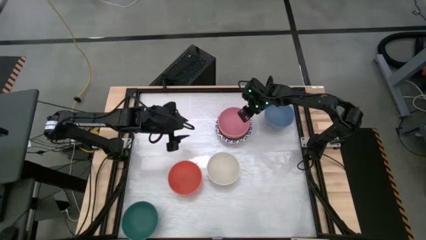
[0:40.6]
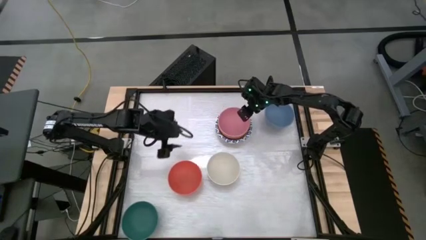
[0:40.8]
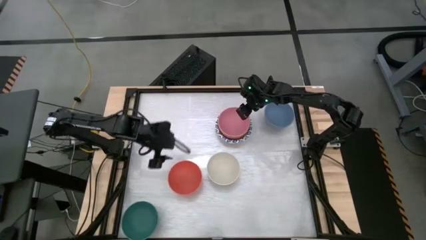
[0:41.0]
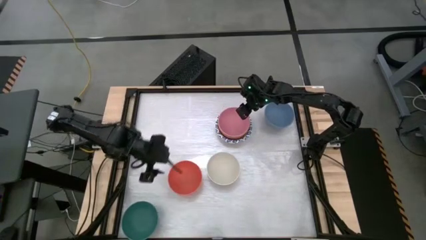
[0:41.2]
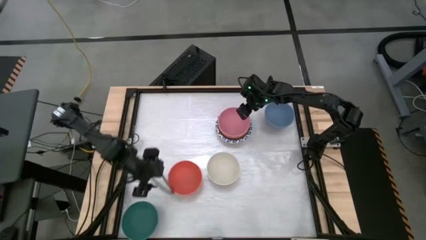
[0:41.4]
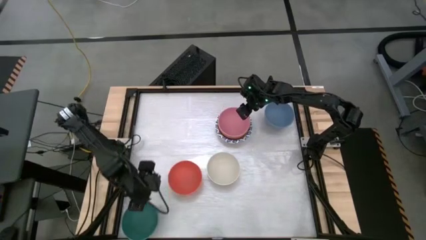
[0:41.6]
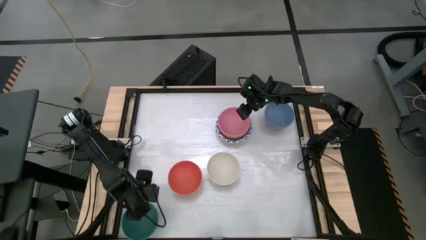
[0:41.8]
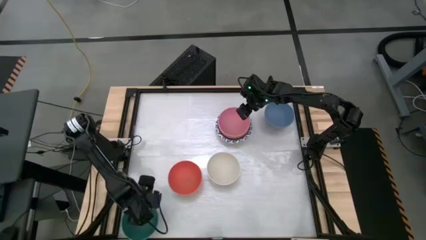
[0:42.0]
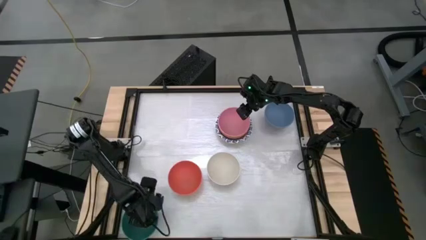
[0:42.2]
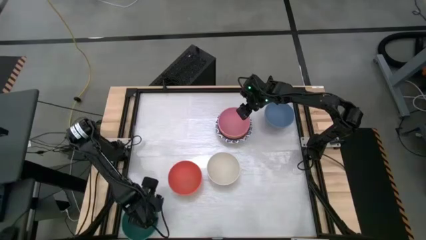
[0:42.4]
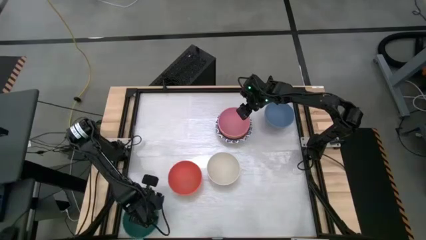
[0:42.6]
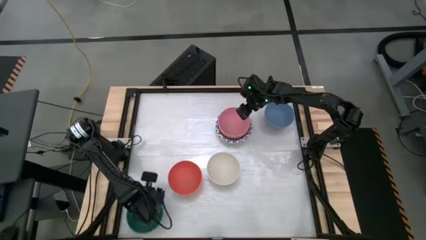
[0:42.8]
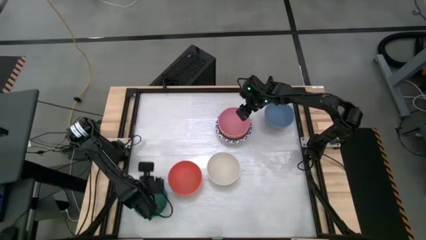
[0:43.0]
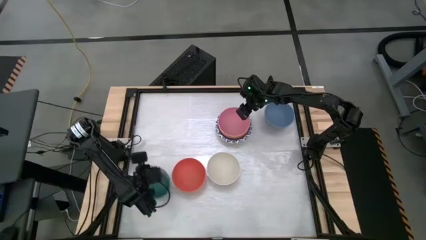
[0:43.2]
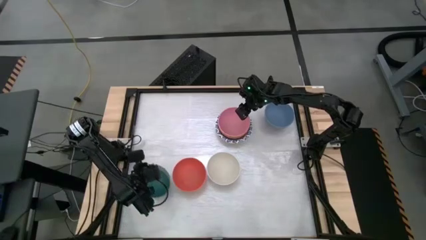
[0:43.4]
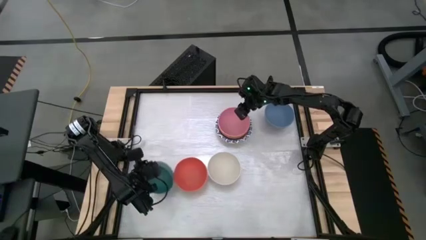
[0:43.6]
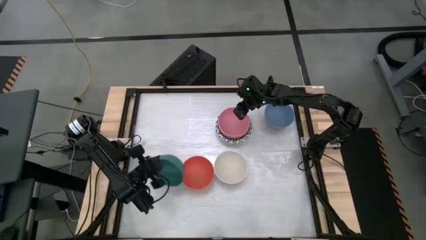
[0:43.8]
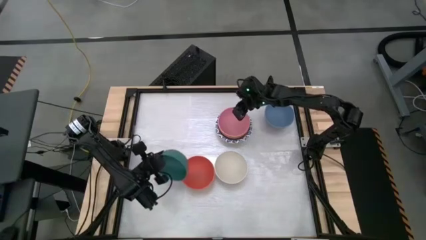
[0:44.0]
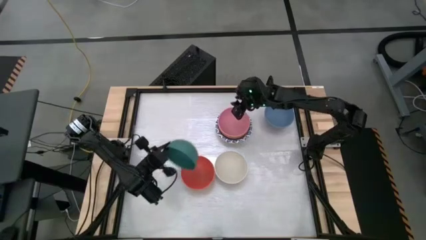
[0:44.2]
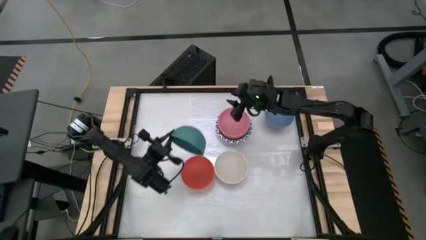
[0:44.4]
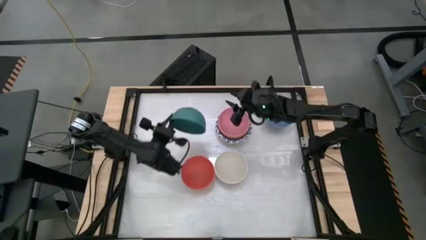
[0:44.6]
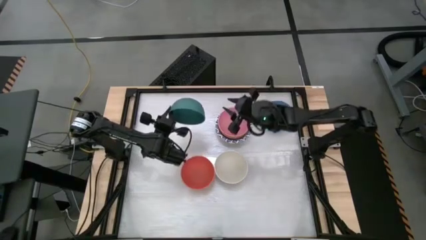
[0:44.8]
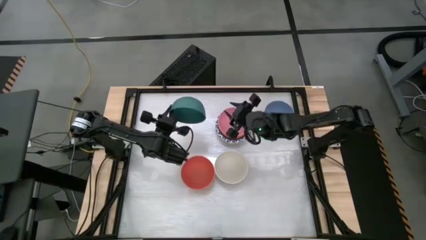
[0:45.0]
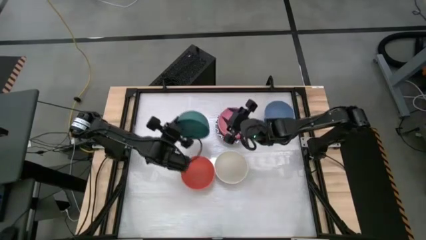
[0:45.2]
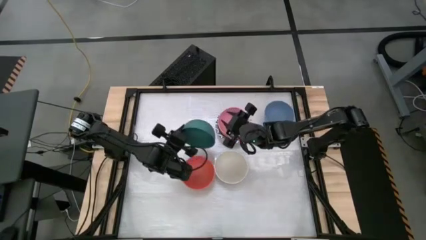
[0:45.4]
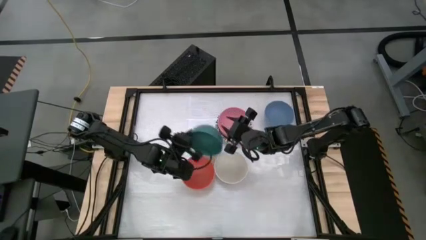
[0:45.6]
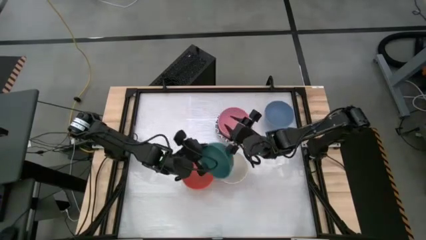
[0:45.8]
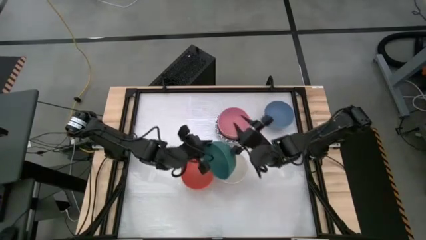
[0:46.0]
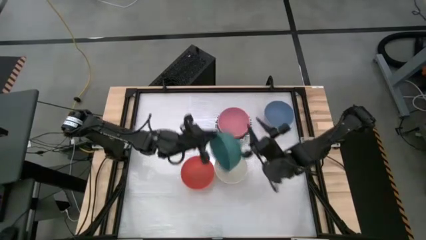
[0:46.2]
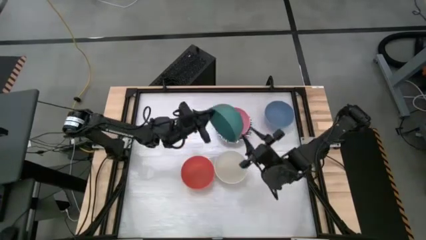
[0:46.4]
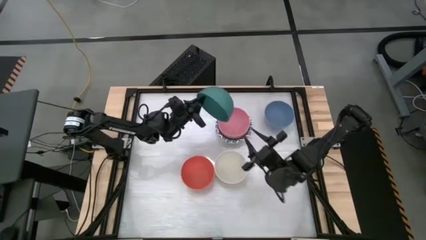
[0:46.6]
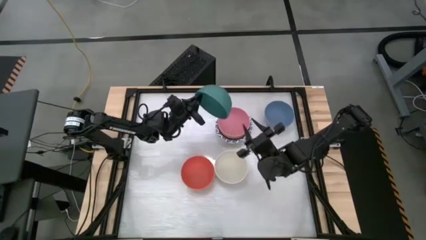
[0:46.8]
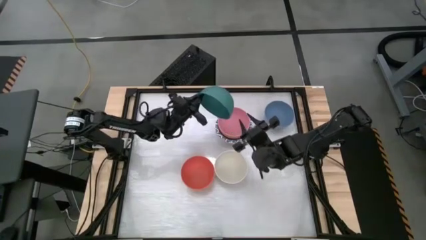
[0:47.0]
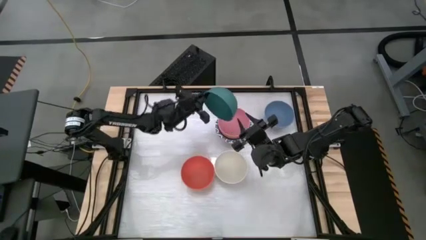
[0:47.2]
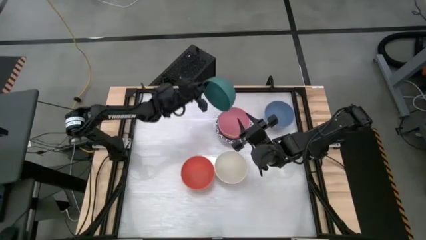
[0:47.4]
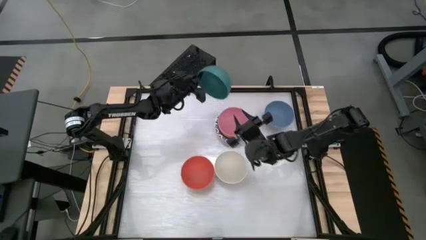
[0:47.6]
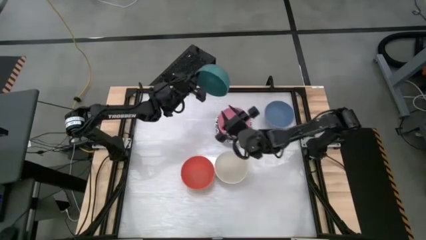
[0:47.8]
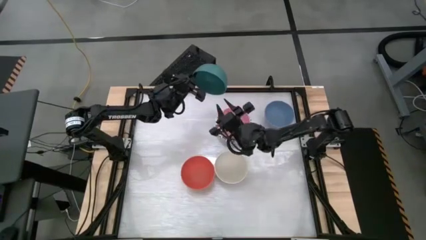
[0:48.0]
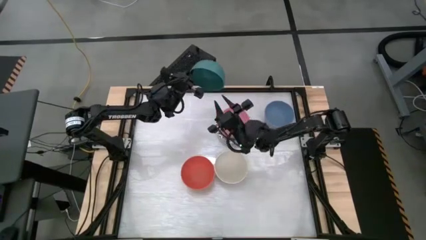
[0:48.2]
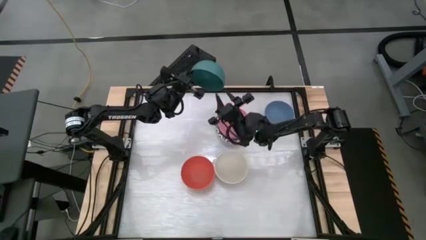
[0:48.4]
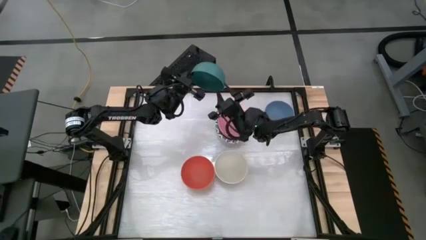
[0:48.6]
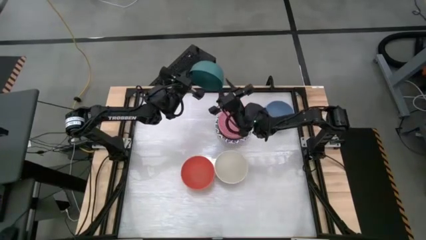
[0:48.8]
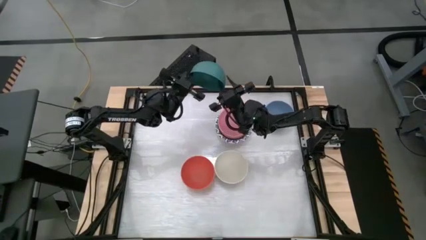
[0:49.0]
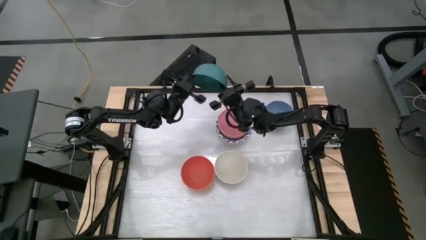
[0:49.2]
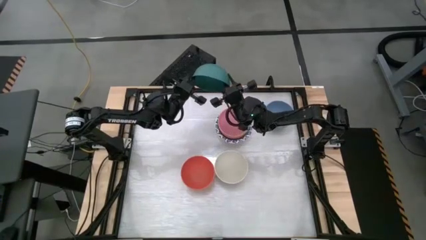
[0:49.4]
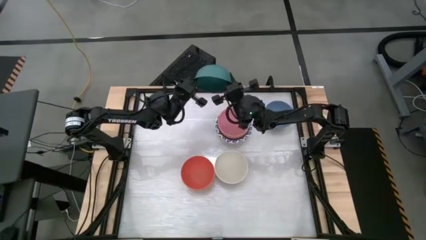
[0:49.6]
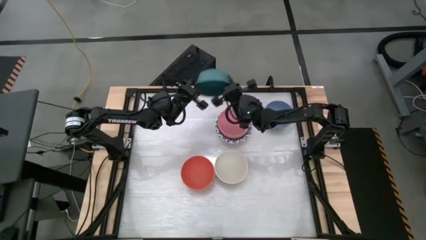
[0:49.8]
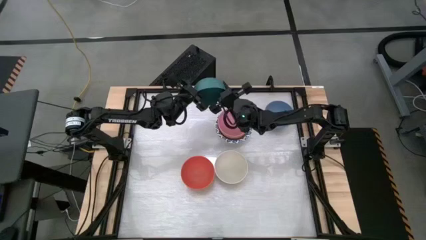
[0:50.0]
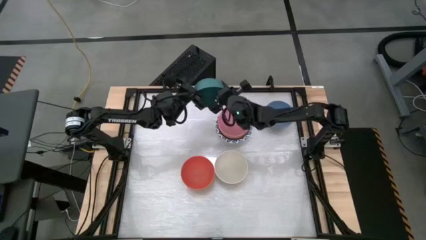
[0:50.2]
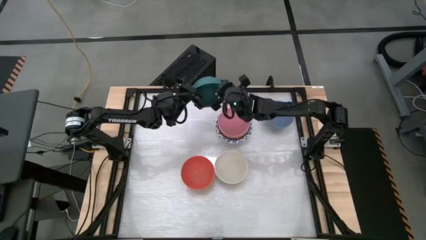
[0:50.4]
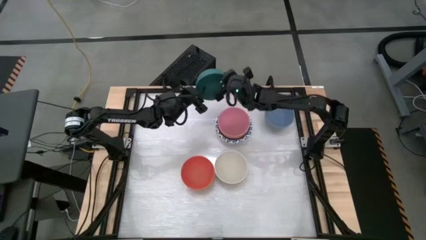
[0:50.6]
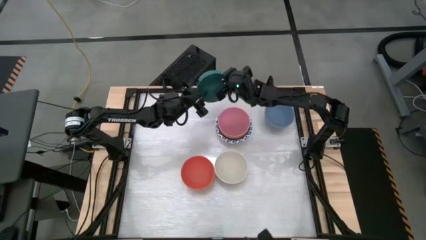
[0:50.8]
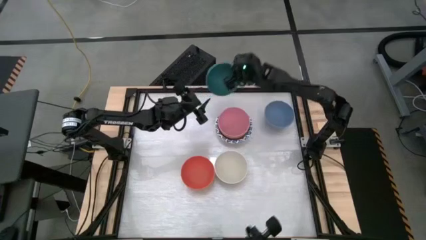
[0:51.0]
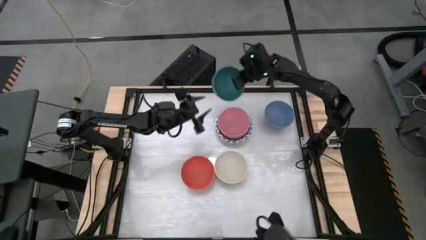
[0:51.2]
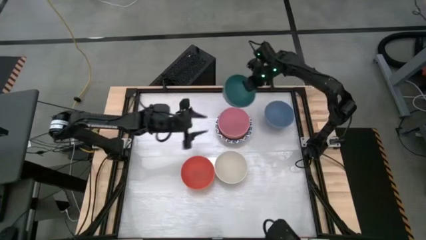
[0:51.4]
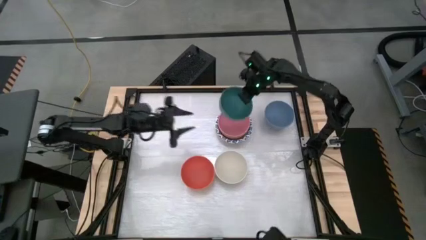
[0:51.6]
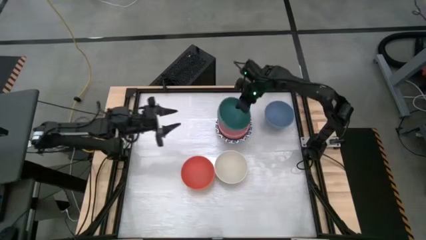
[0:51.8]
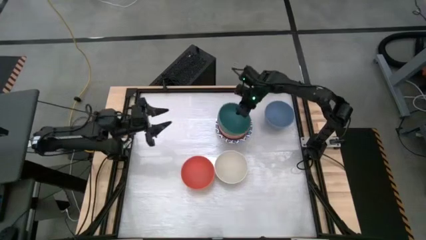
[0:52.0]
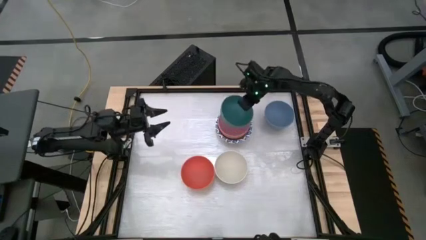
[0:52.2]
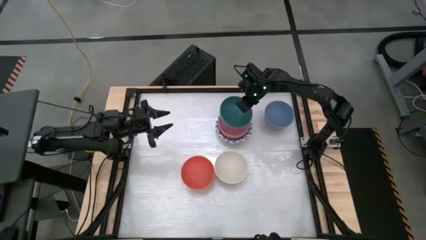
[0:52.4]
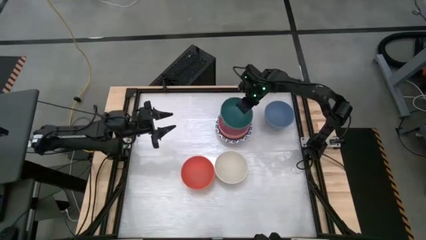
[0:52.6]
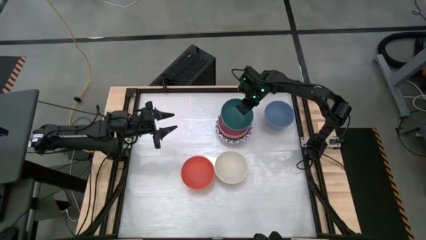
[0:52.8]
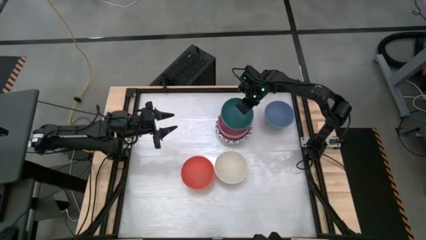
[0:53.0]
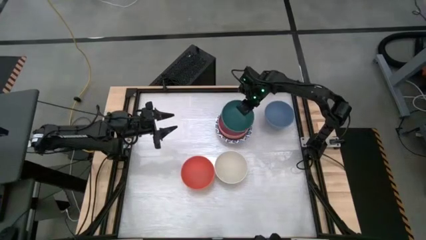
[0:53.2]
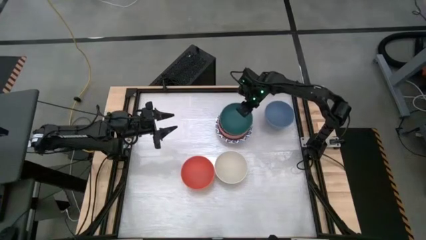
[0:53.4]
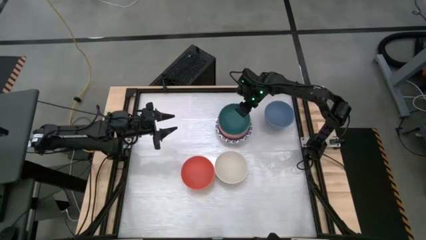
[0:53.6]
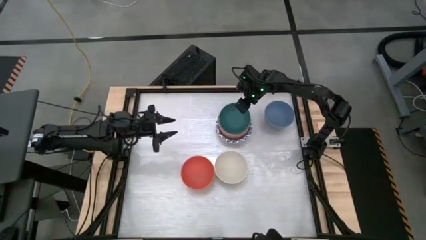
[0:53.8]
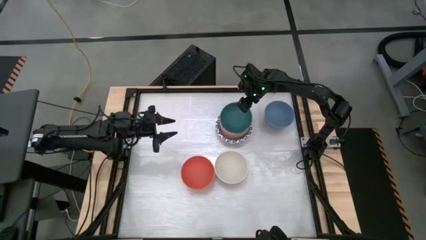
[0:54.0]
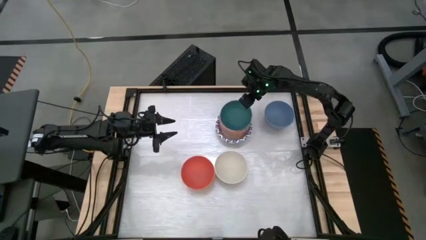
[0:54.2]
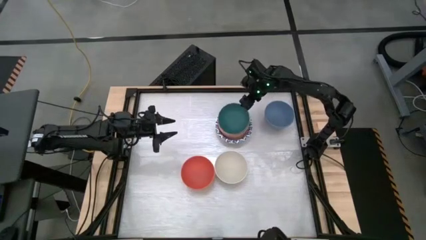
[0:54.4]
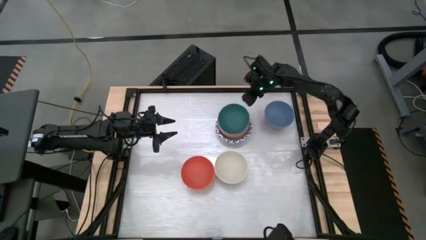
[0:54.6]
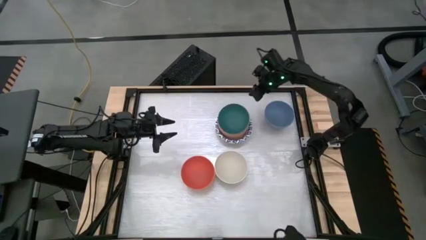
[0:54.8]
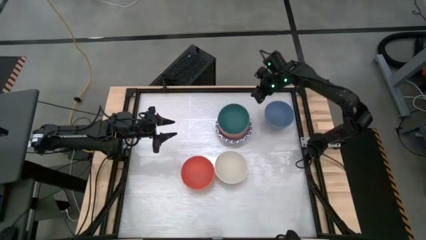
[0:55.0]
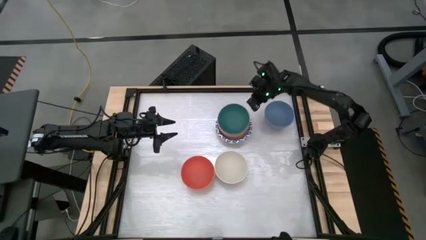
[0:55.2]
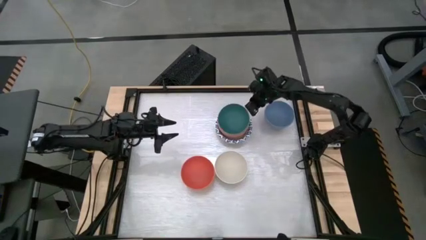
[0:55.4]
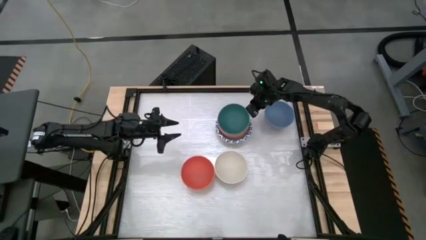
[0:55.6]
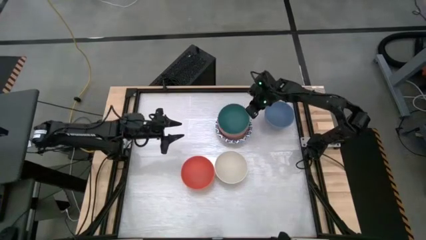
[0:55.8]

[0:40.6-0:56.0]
Task: Nest bowls inside each other by size order
Stack the green bowl on top of the pink bowl
